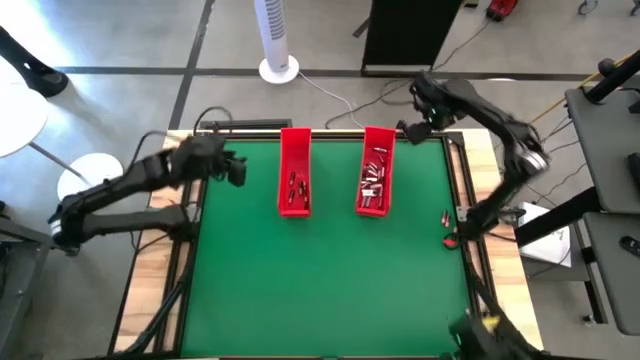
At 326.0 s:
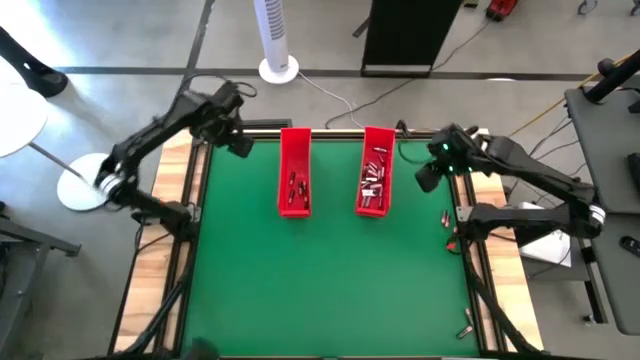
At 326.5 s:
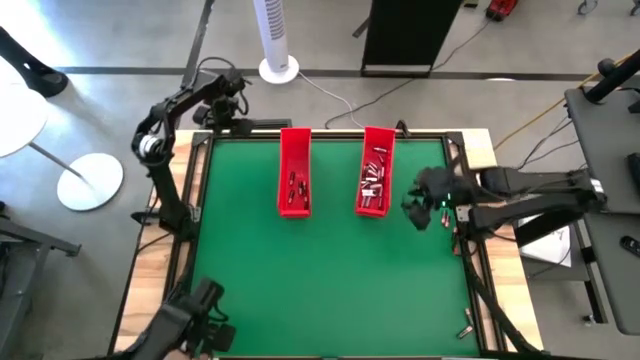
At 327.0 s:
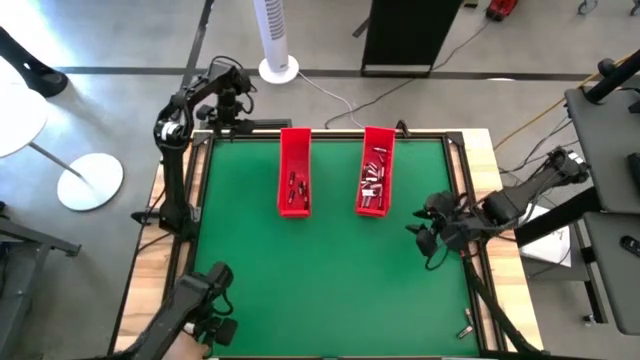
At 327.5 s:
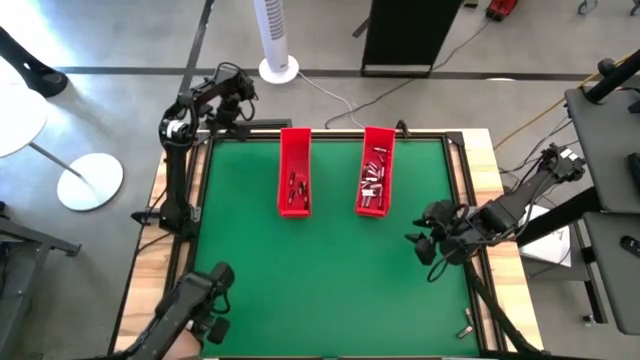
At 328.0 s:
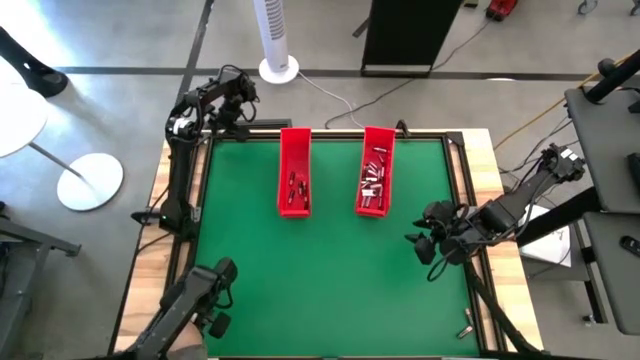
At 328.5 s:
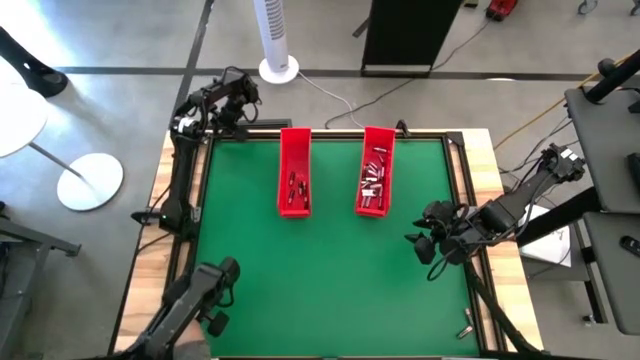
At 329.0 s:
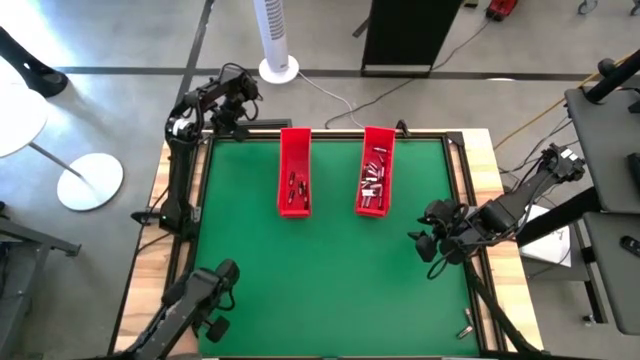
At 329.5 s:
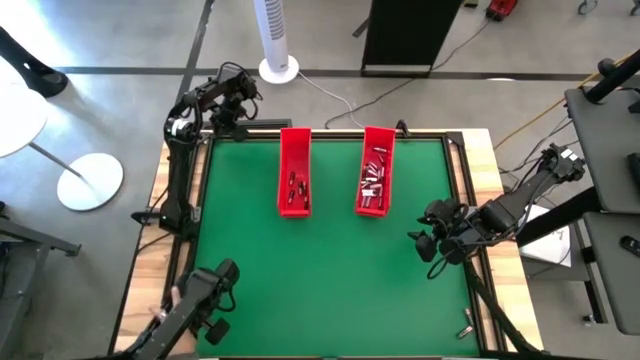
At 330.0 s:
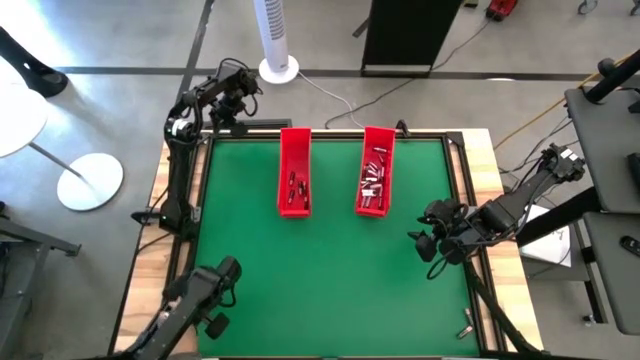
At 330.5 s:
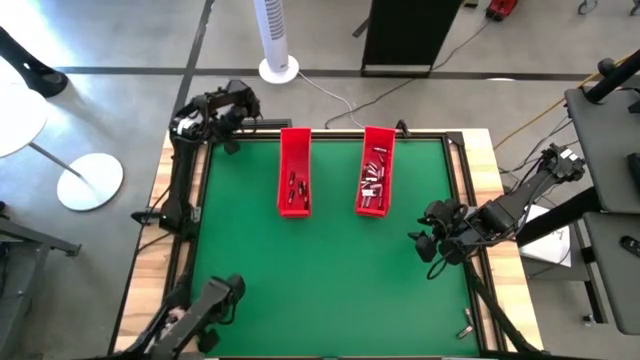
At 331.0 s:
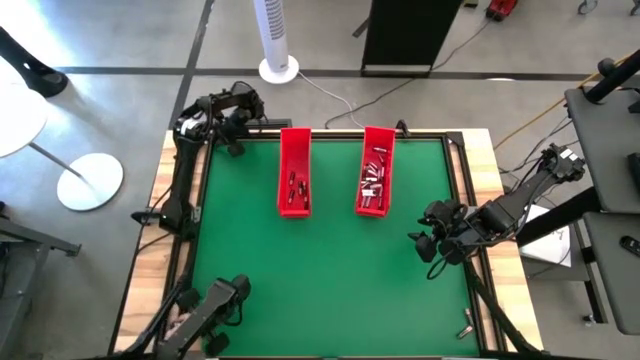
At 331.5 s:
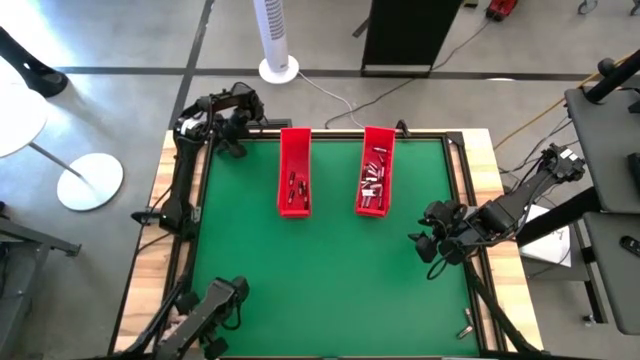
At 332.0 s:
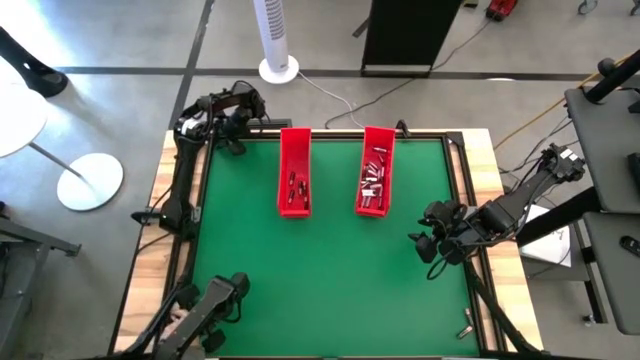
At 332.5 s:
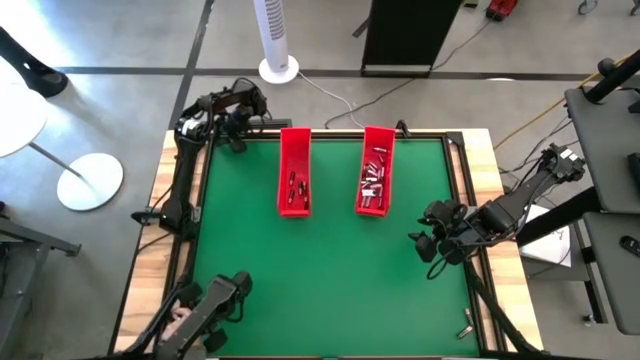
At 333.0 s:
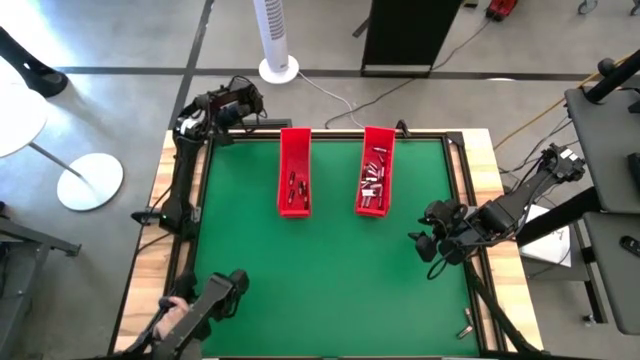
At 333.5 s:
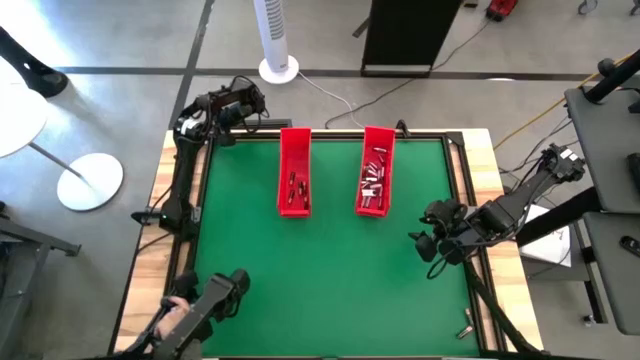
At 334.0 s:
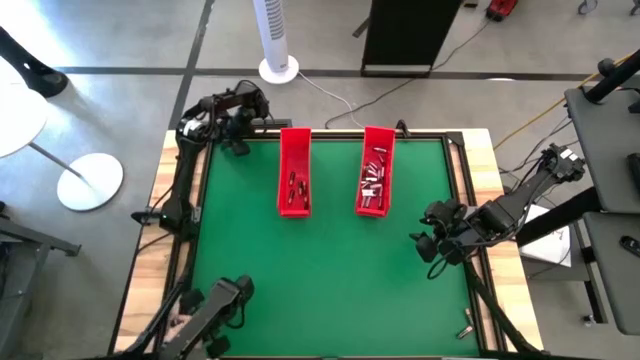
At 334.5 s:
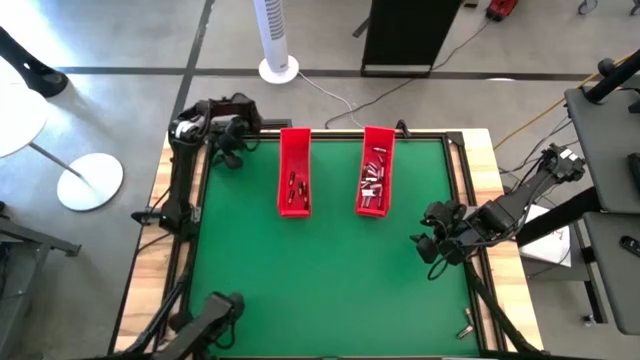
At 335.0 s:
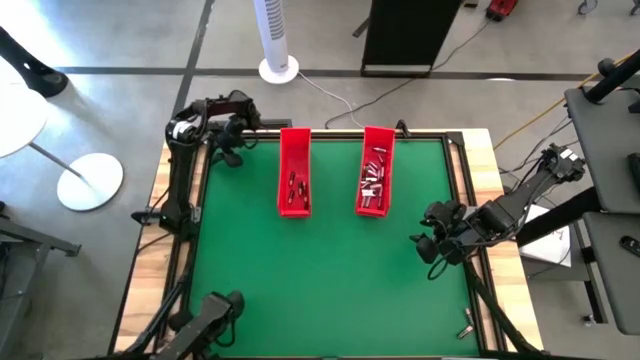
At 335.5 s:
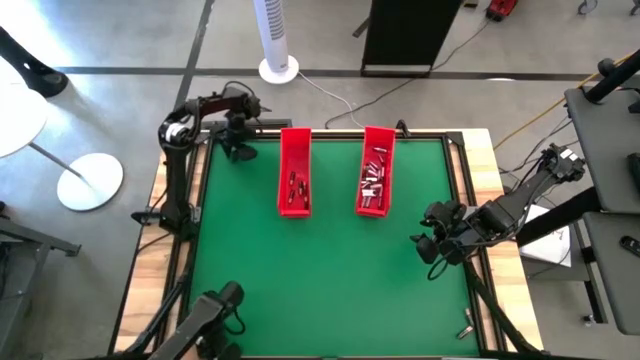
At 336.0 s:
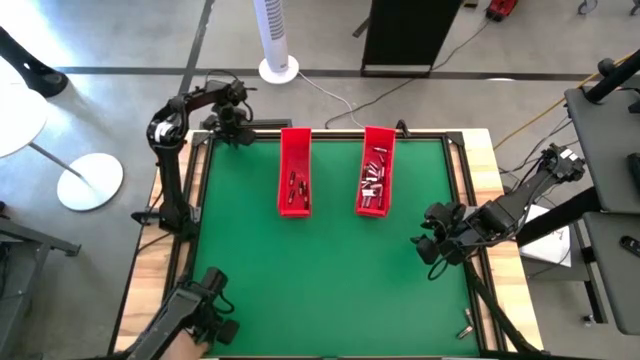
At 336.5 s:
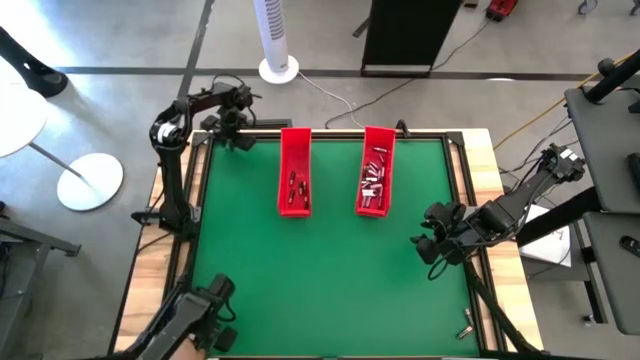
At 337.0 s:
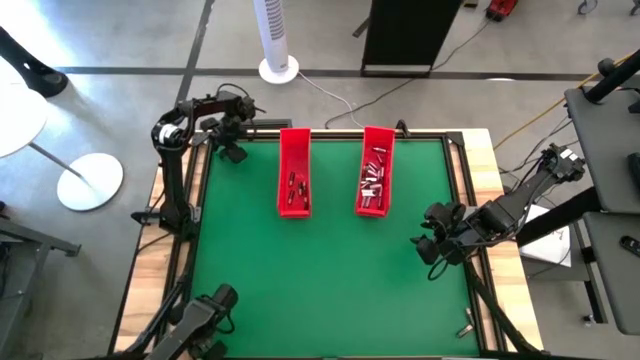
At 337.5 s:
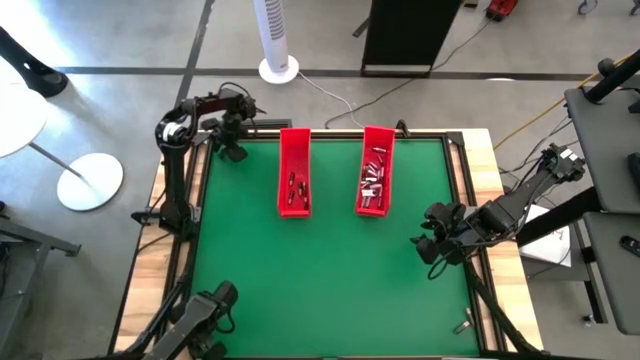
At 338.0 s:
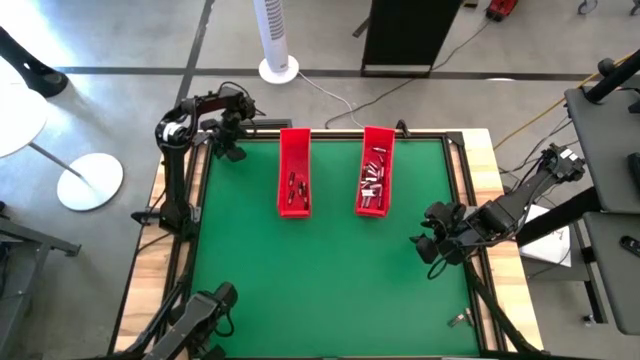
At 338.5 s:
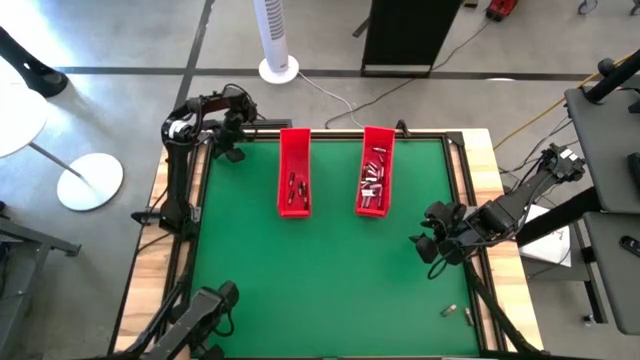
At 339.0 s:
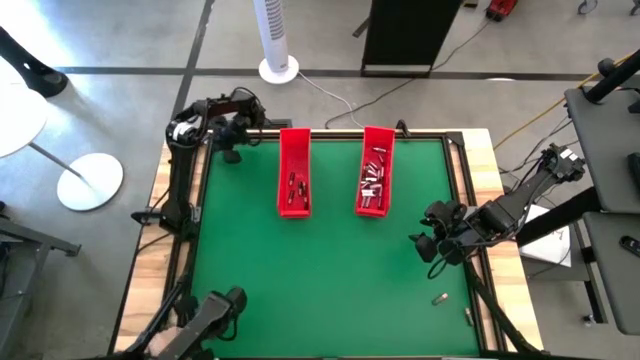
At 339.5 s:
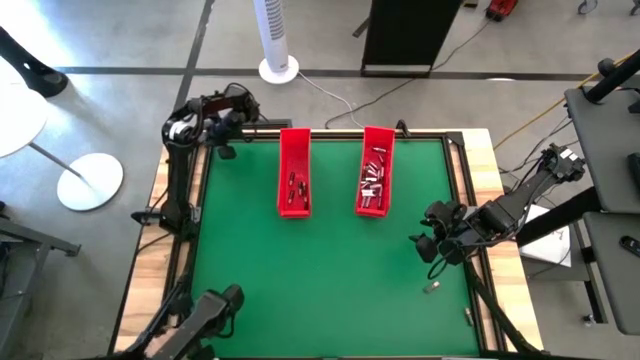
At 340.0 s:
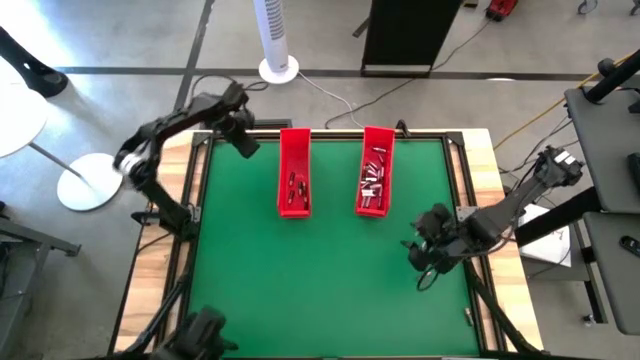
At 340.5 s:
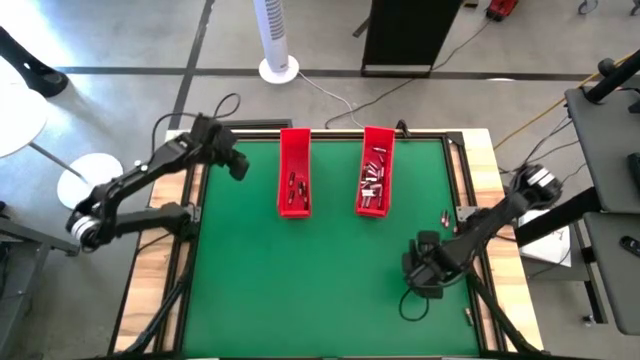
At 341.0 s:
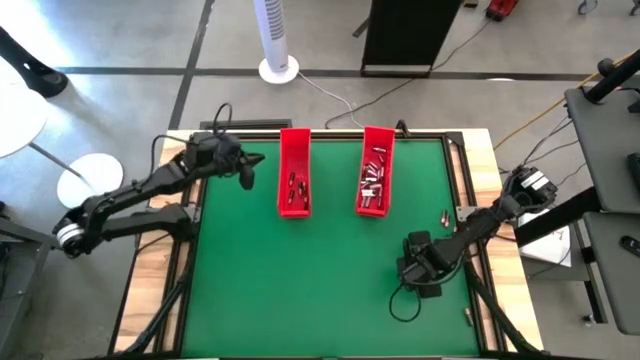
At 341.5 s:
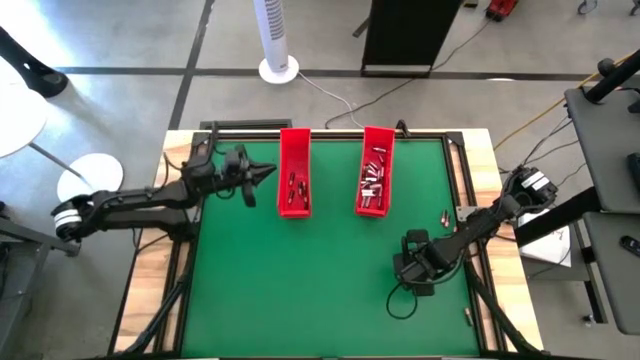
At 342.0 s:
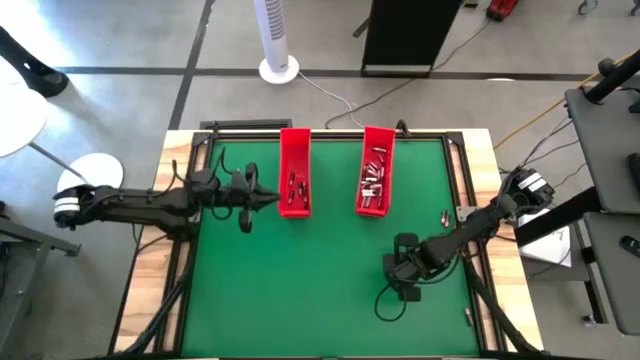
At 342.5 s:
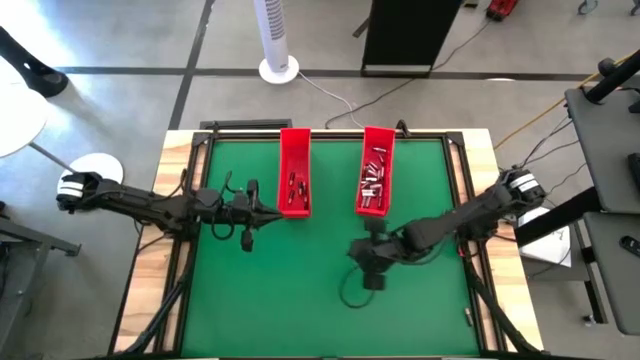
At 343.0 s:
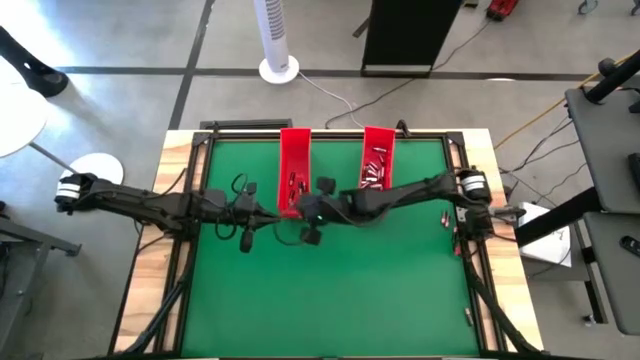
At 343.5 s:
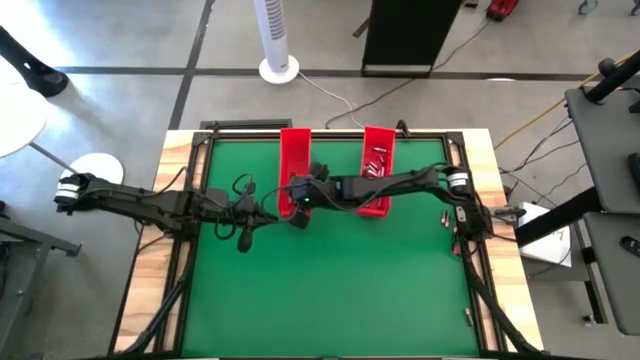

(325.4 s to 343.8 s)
Task: Sort batteries
Put the black battery into the left red bin

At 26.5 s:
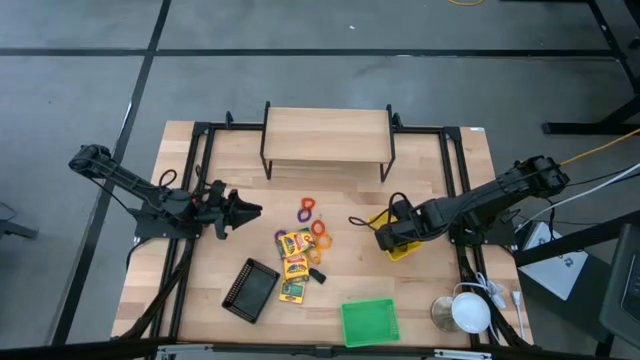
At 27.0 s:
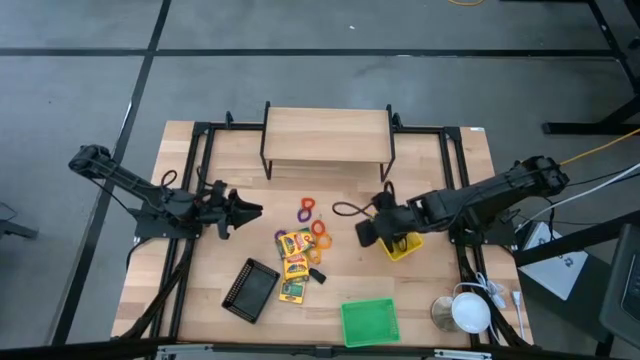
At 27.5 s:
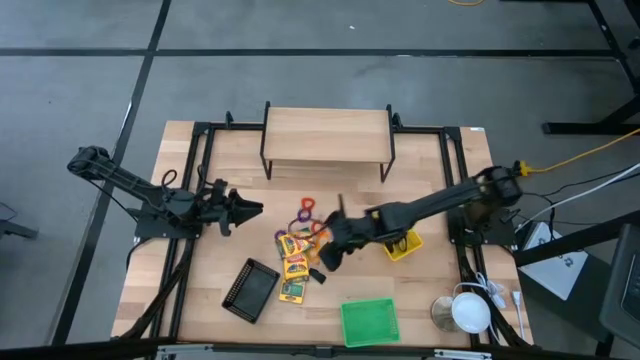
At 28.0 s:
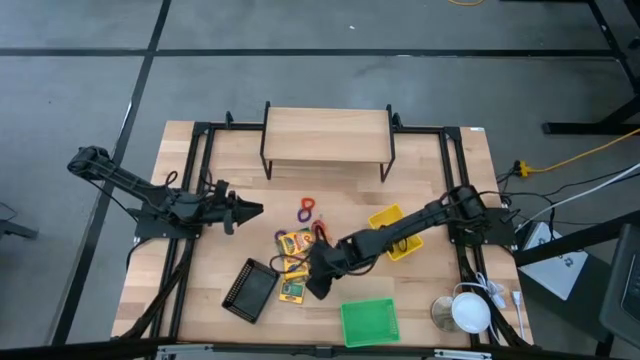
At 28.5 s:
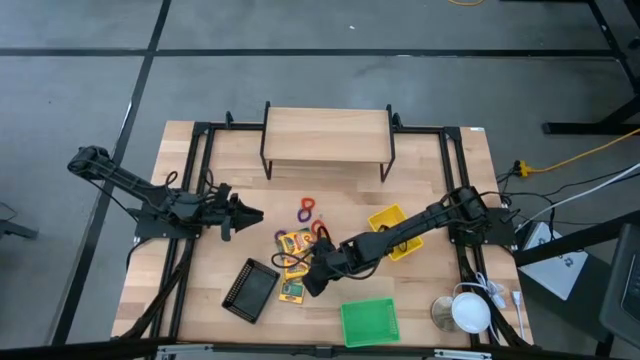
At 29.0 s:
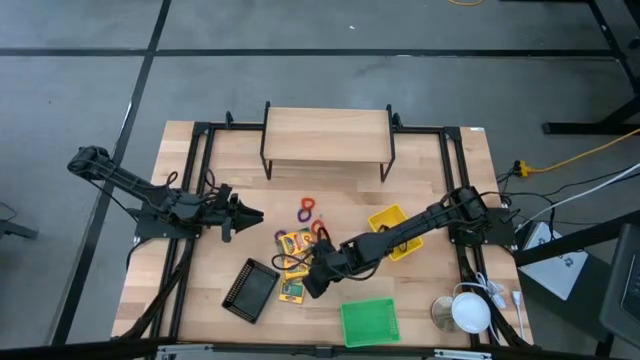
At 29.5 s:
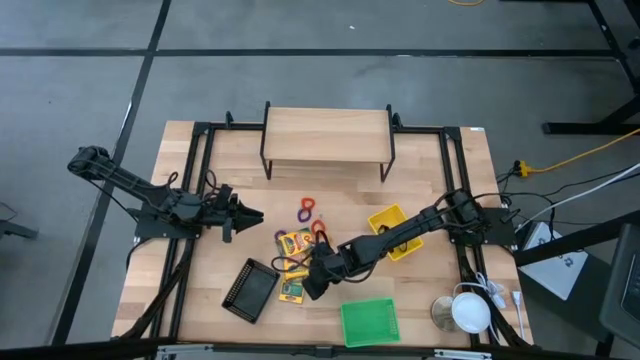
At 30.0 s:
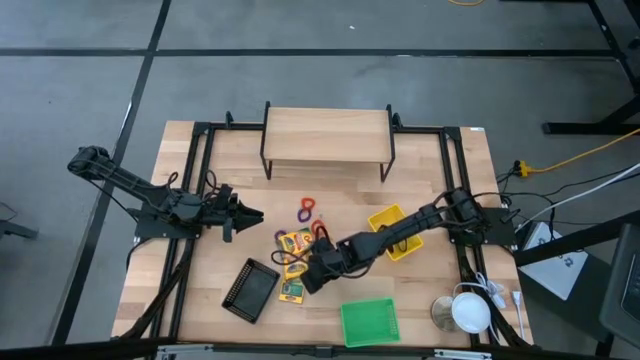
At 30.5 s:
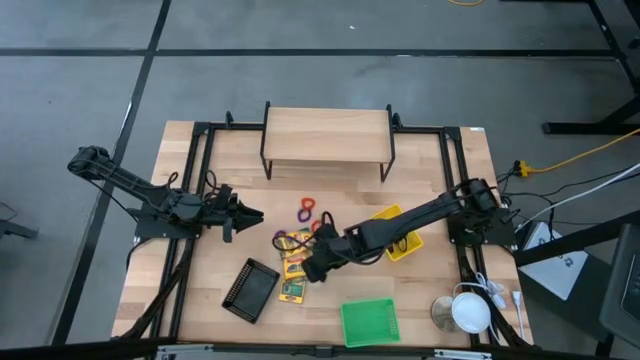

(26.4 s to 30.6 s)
Task: Pick & Place Office Desk Supplies
Put the black rubber band into the yellow basket
